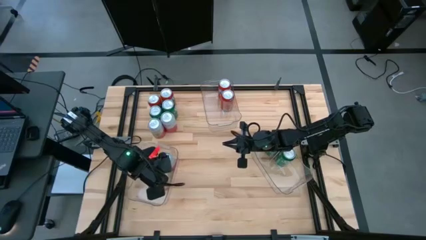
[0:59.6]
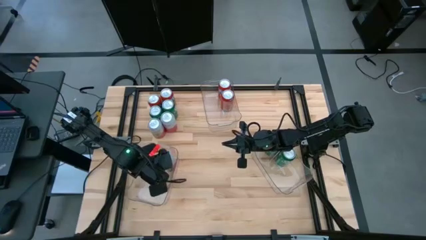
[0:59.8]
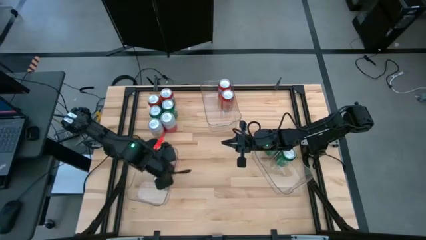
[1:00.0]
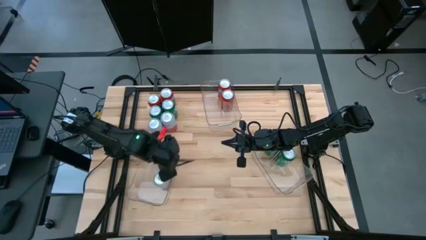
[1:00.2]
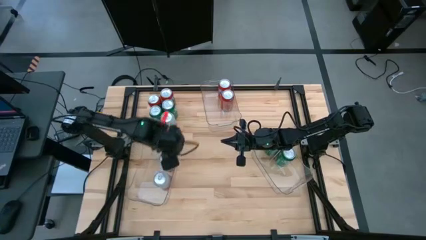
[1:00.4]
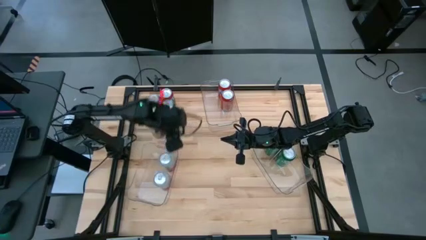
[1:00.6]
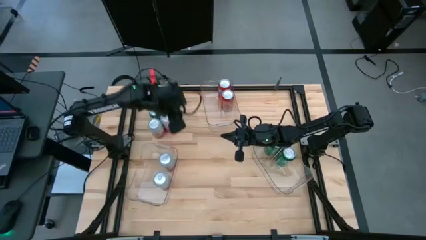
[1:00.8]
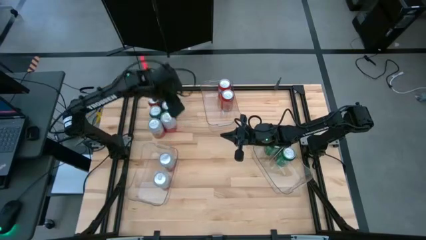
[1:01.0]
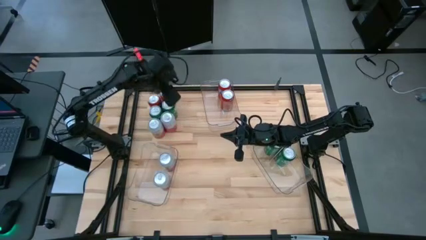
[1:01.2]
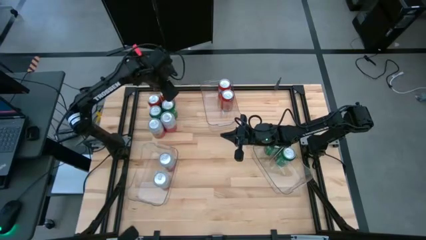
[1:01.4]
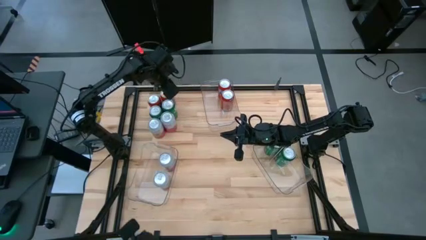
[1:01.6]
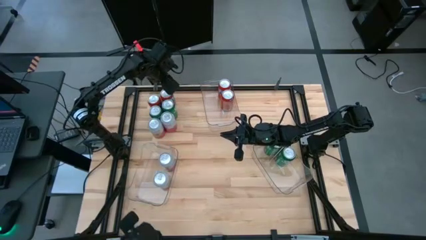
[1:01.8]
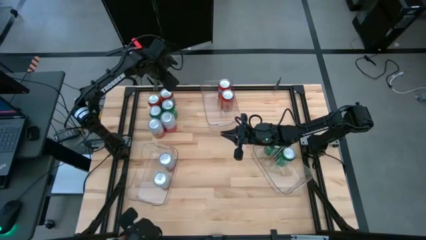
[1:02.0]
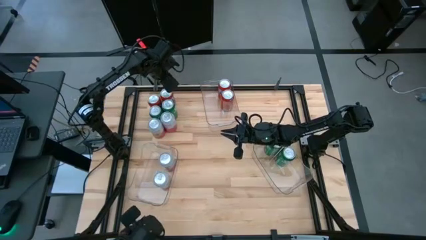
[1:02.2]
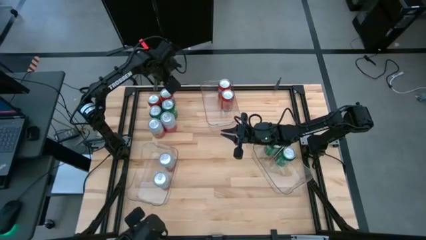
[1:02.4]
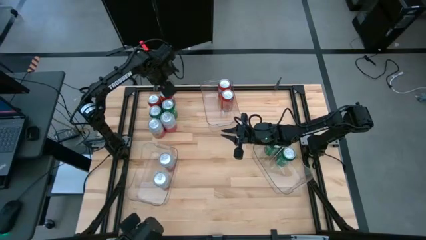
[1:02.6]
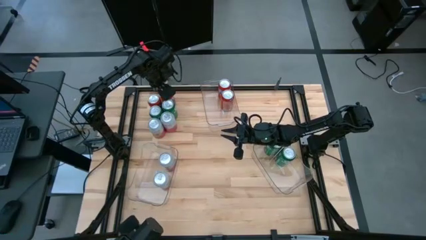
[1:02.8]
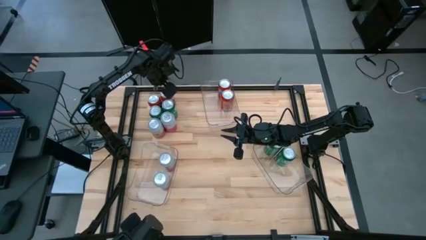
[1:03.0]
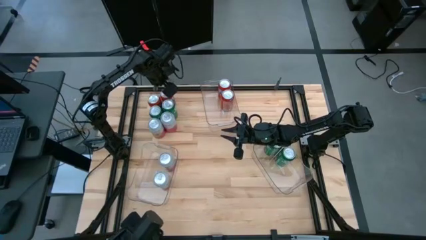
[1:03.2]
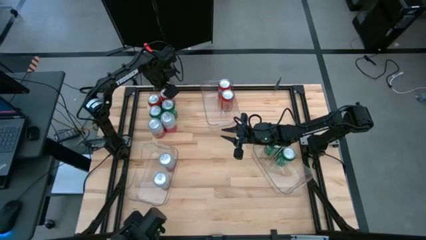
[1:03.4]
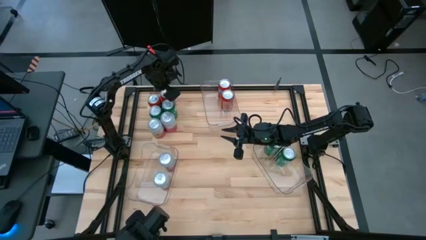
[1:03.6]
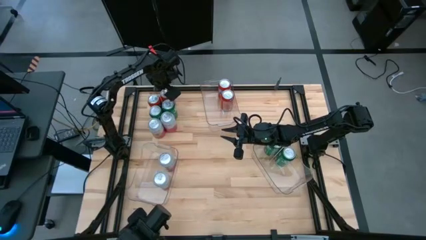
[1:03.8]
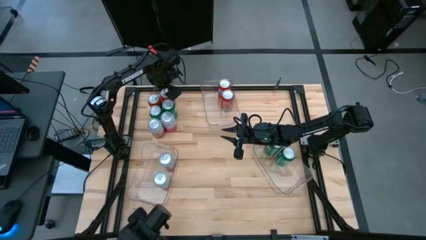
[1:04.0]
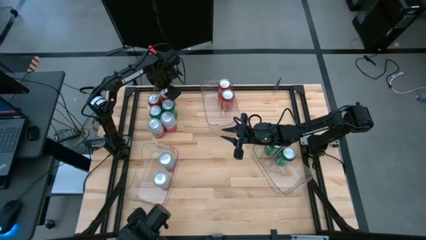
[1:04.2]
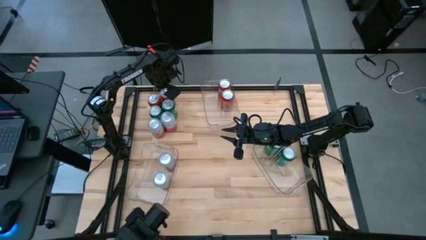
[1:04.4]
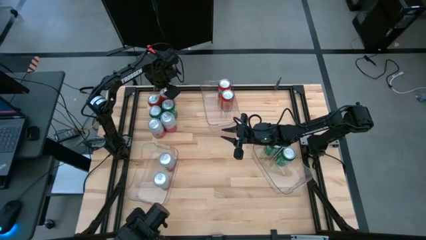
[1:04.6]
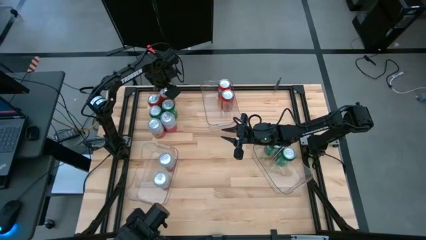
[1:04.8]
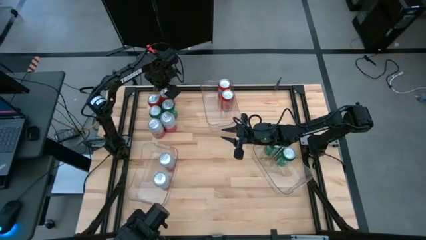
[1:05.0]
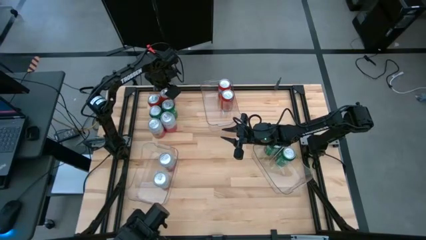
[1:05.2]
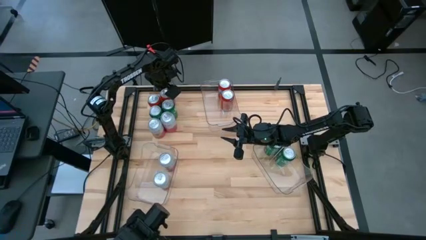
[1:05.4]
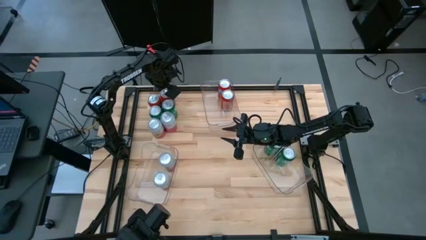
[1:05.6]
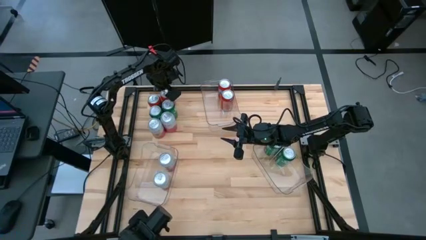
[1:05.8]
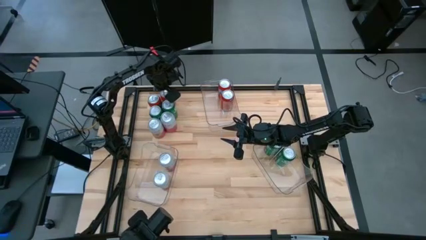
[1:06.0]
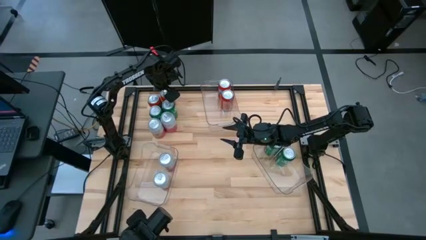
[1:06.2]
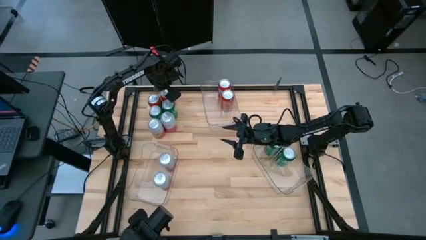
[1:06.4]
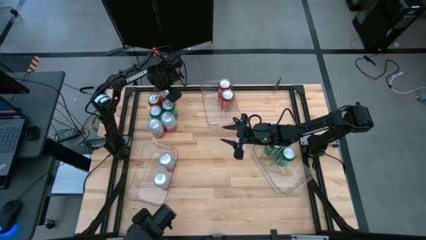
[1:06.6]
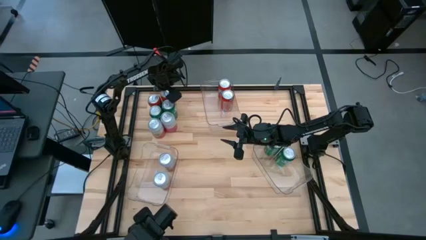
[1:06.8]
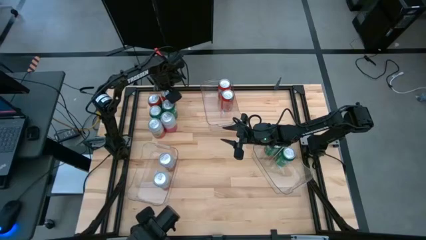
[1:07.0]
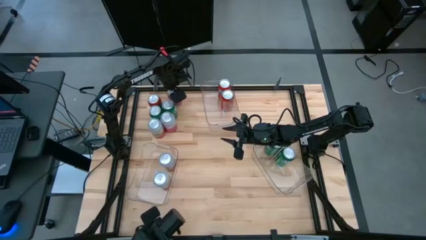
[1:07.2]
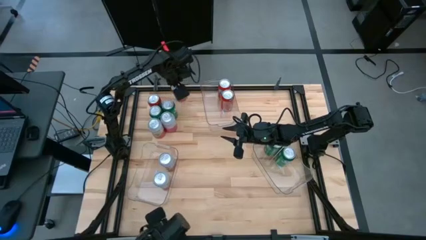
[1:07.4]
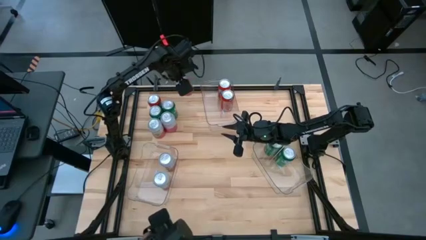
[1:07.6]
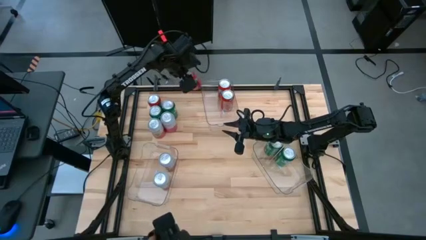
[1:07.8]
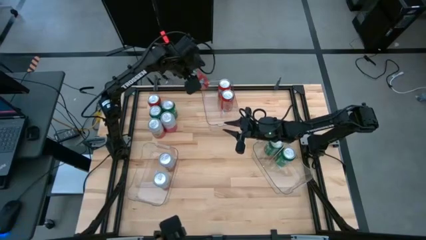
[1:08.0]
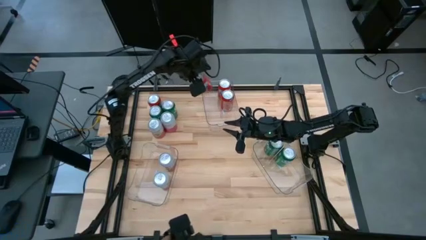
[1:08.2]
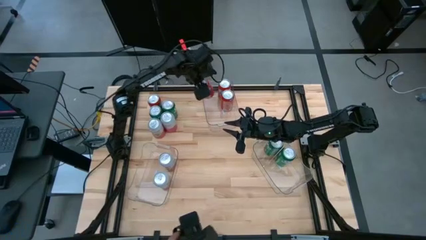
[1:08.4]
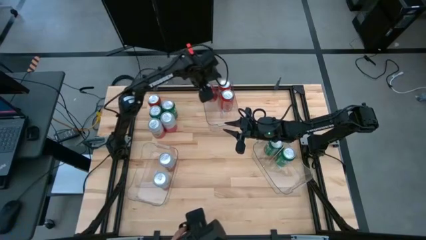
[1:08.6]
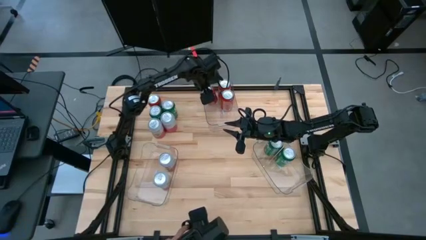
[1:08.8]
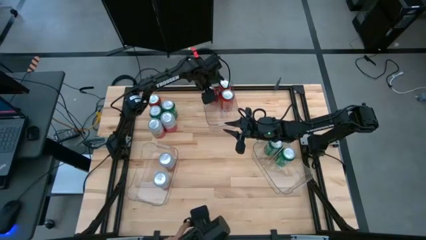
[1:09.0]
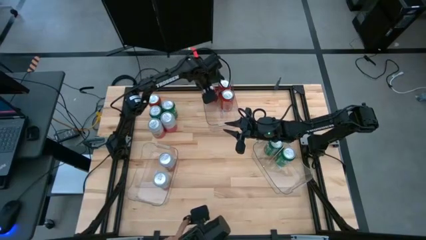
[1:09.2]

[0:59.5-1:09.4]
Task: Sort soda cans
Put the orange soda can into the top transparent bin

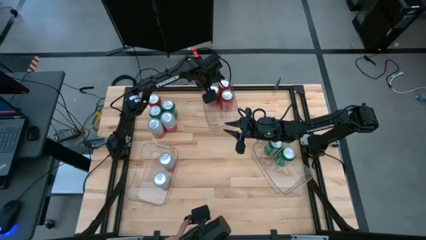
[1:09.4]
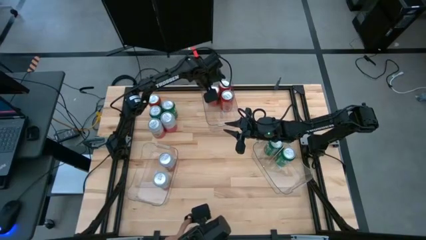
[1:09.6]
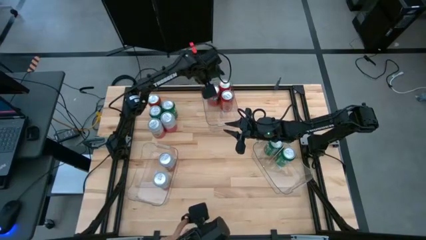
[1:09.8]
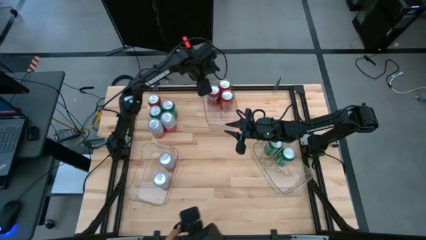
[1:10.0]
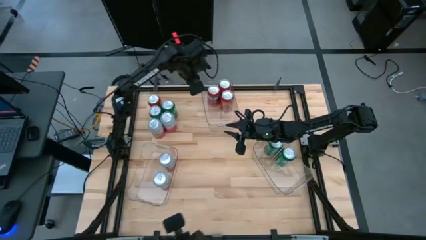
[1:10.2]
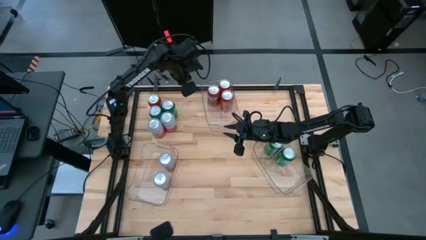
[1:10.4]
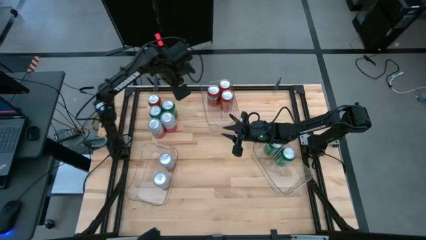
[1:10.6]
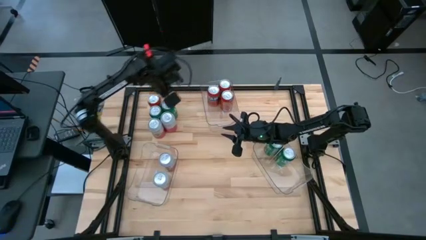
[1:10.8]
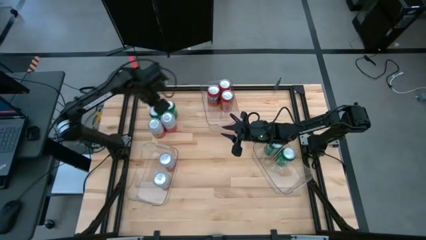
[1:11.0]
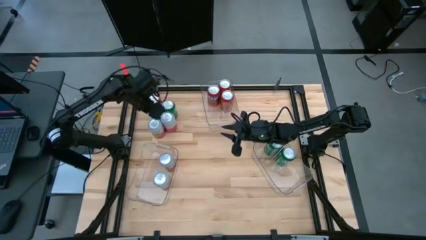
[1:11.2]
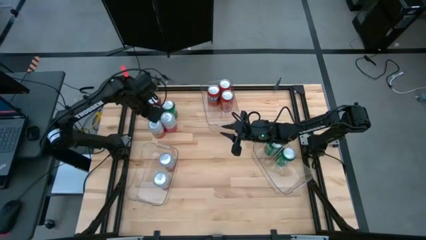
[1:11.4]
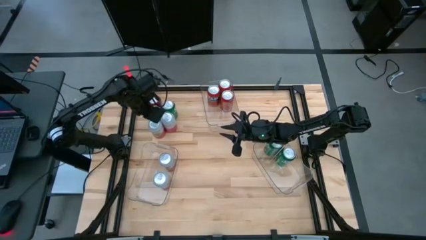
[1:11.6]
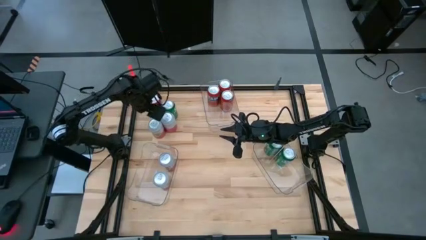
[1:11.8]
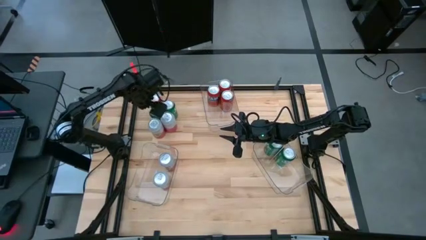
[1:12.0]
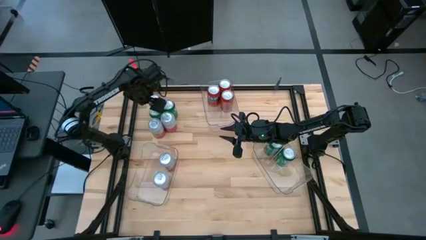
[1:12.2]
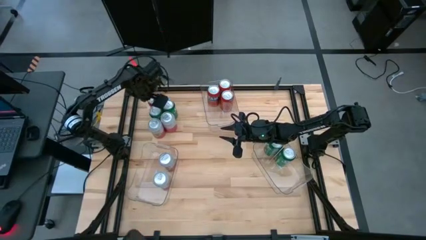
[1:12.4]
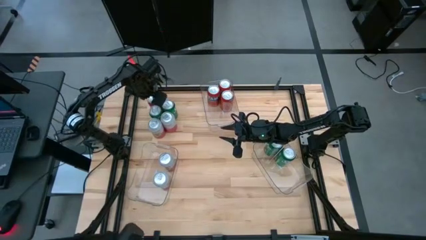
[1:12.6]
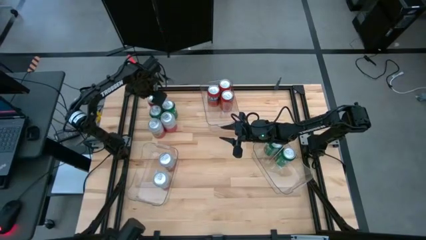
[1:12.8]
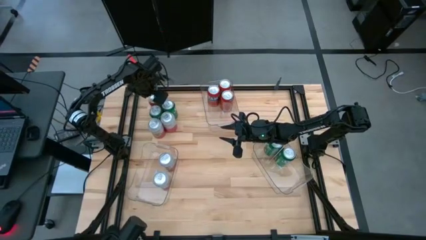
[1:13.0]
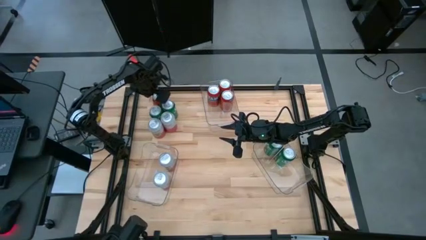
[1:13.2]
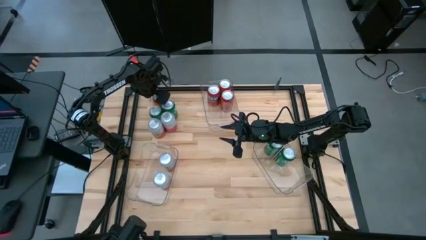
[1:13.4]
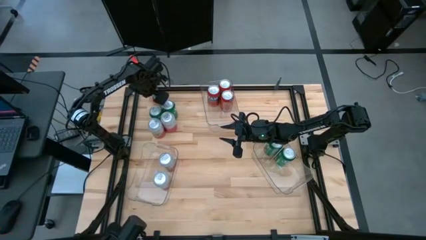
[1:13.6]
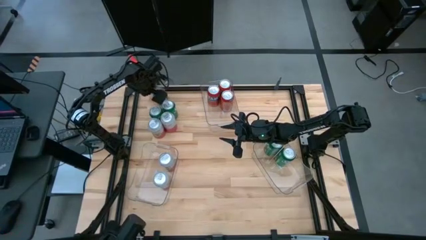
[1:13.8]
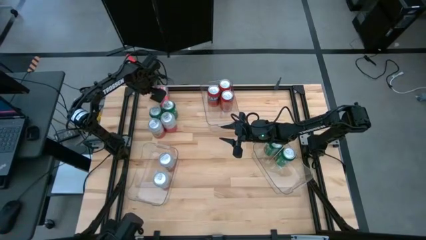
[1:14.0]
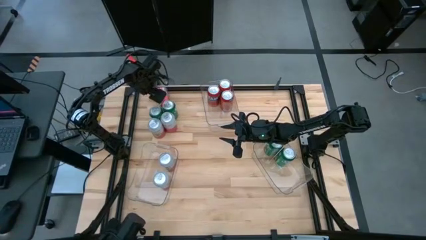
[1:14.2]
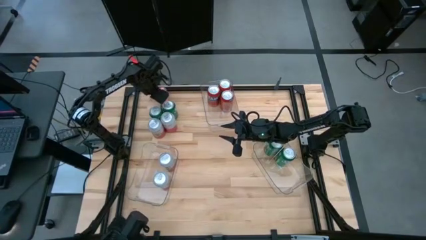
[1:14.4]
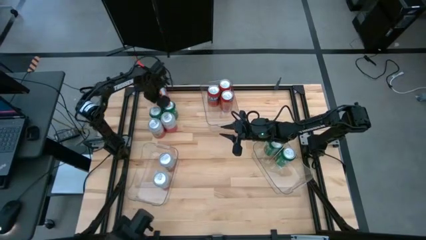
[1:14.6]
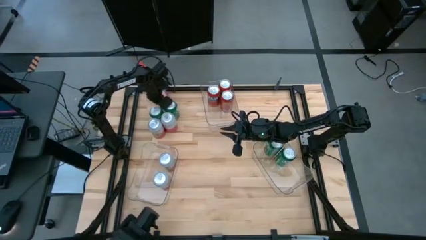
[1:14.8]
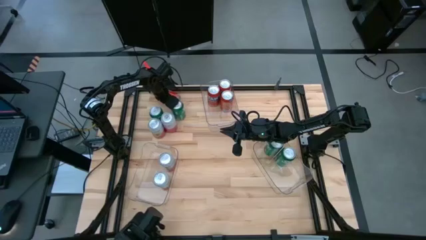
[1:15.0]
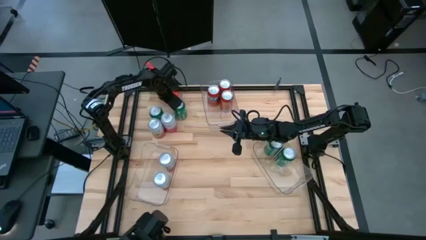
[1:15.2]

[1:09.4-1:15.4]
Put the orange soda can into the top transparent bin
